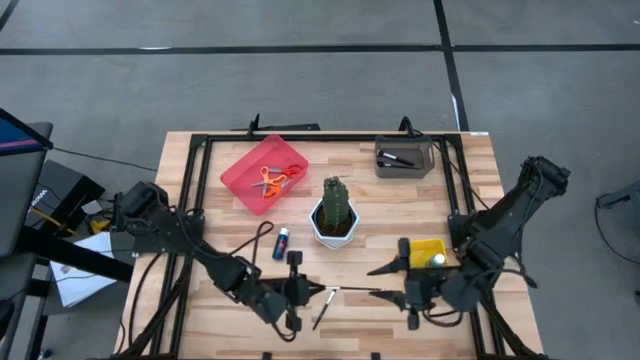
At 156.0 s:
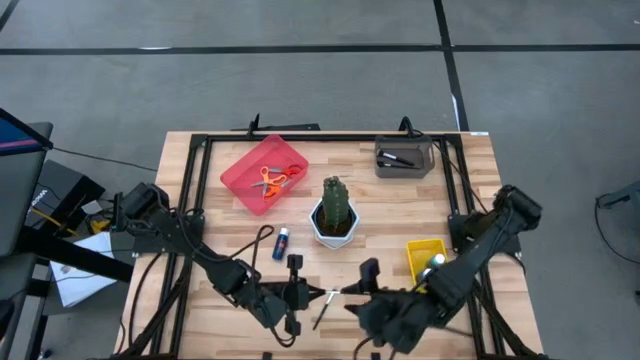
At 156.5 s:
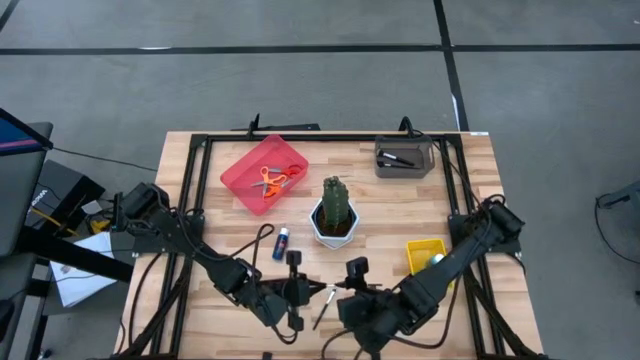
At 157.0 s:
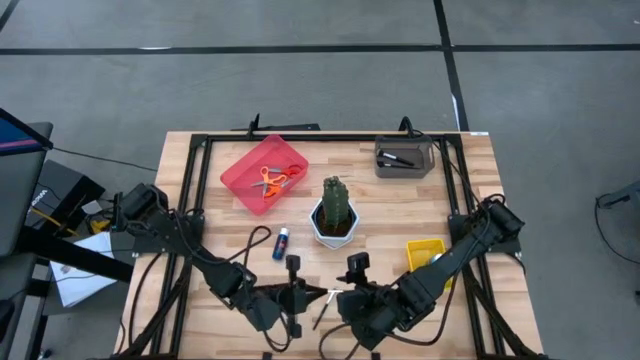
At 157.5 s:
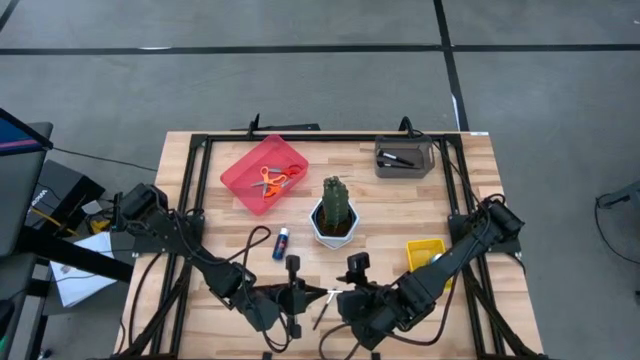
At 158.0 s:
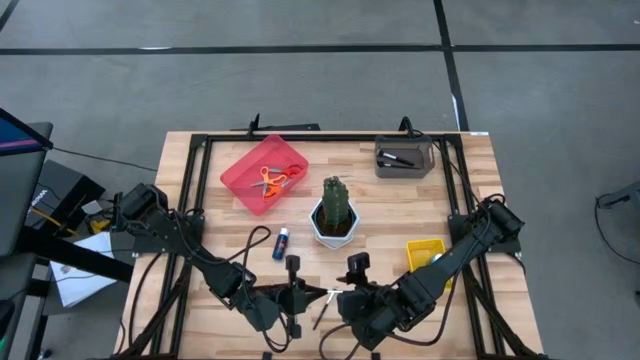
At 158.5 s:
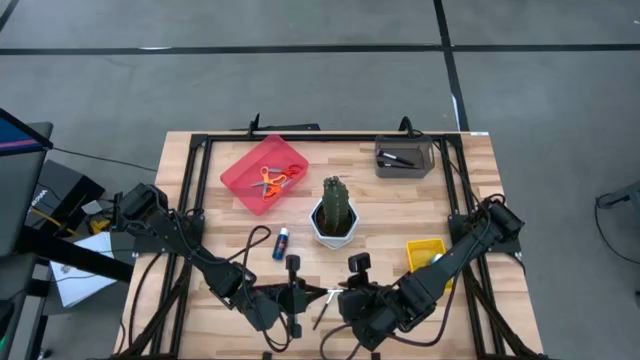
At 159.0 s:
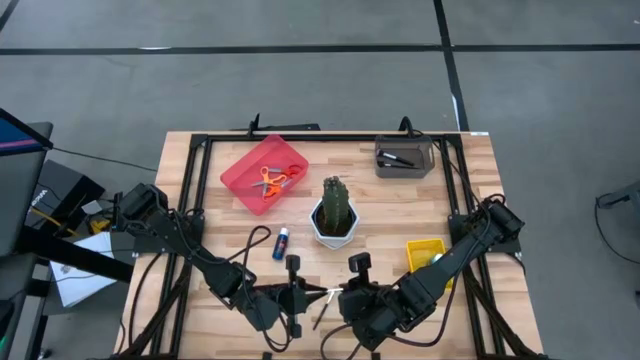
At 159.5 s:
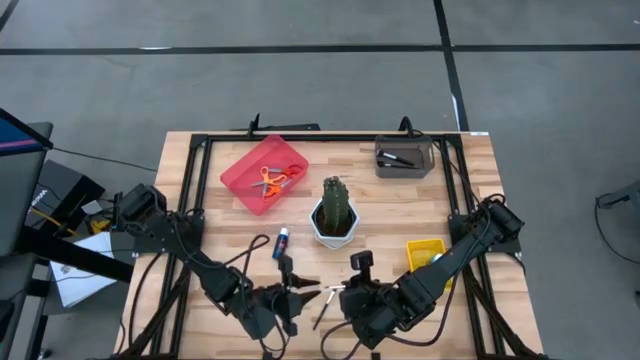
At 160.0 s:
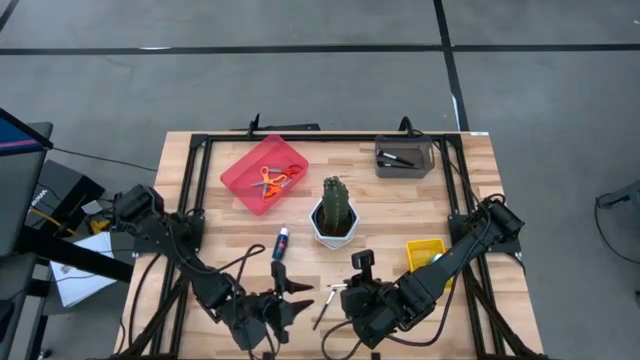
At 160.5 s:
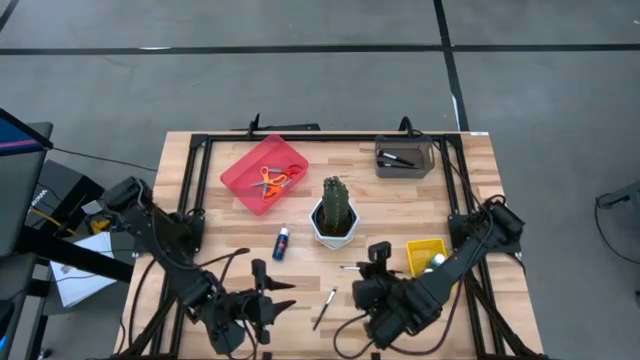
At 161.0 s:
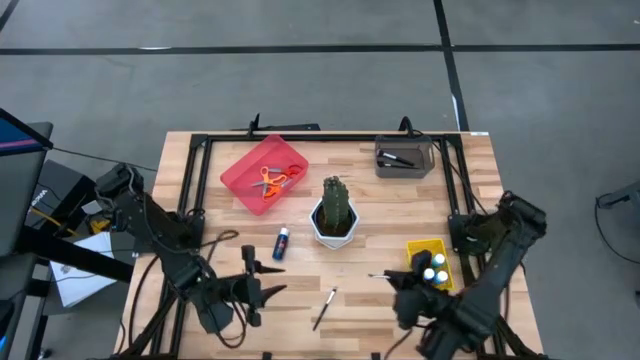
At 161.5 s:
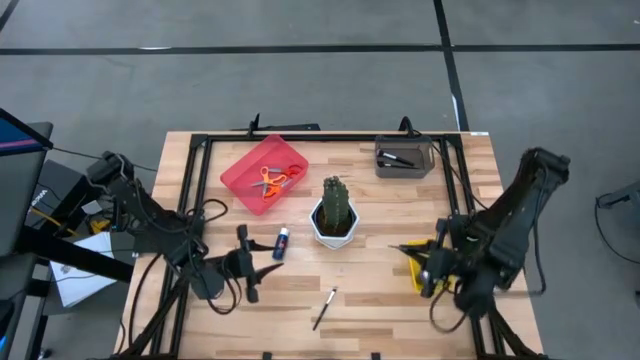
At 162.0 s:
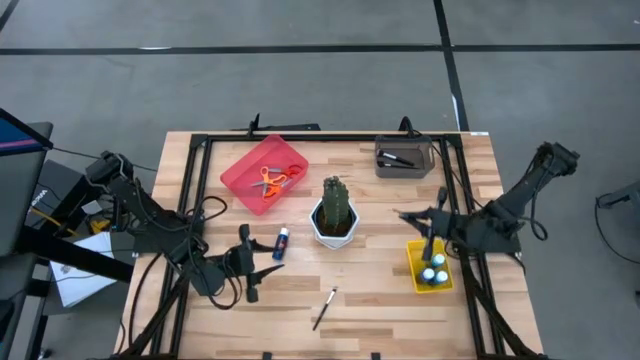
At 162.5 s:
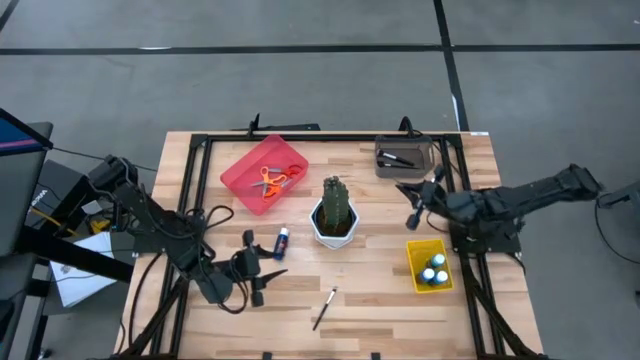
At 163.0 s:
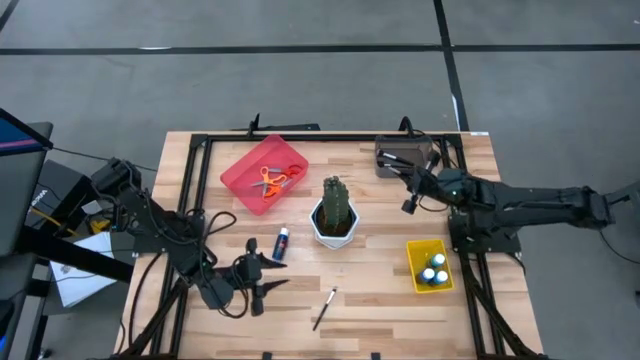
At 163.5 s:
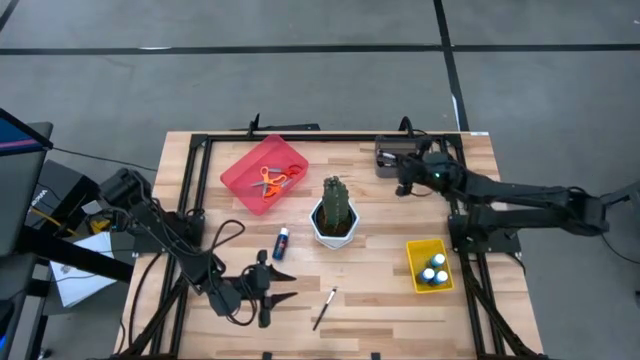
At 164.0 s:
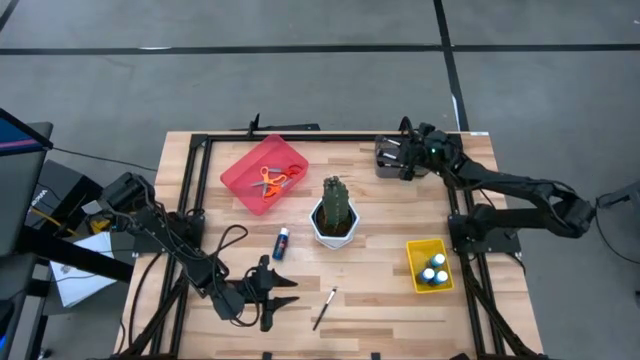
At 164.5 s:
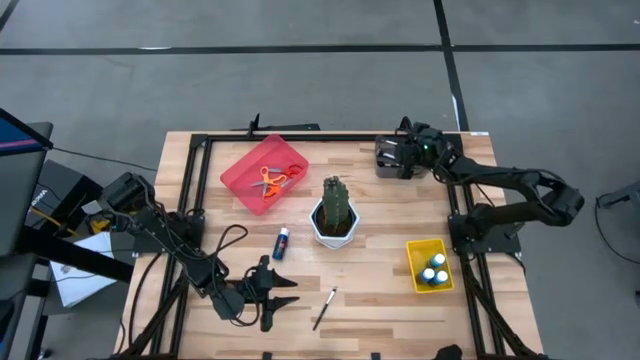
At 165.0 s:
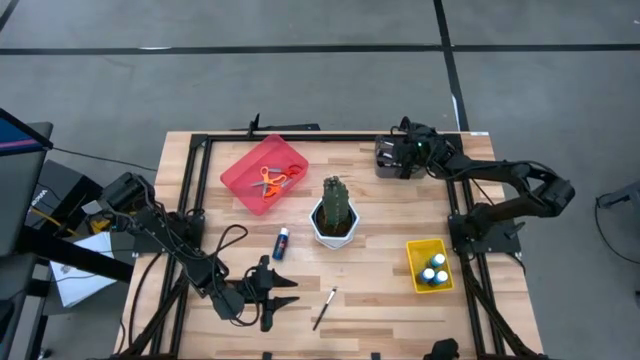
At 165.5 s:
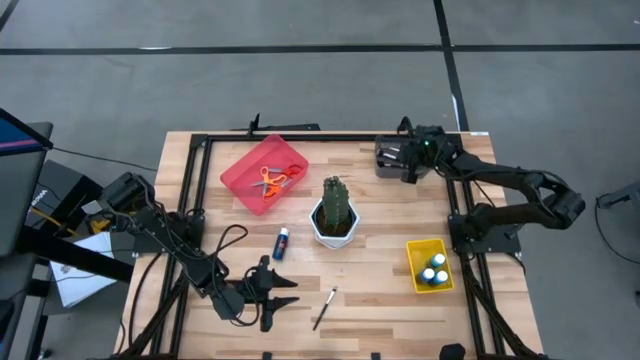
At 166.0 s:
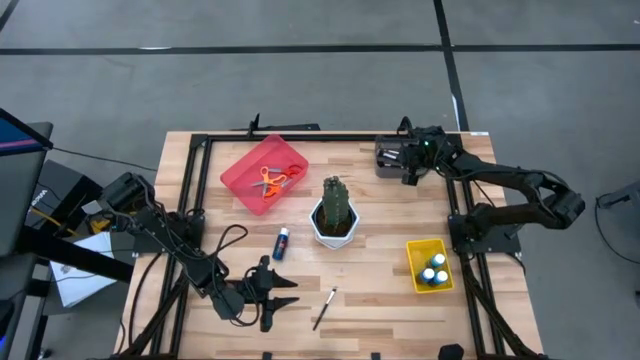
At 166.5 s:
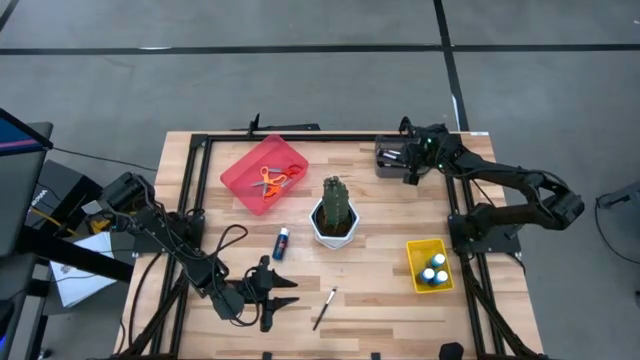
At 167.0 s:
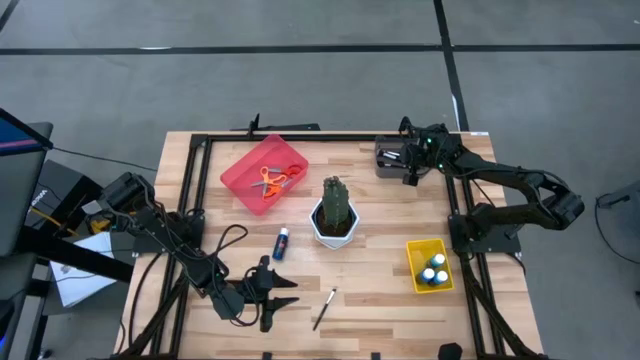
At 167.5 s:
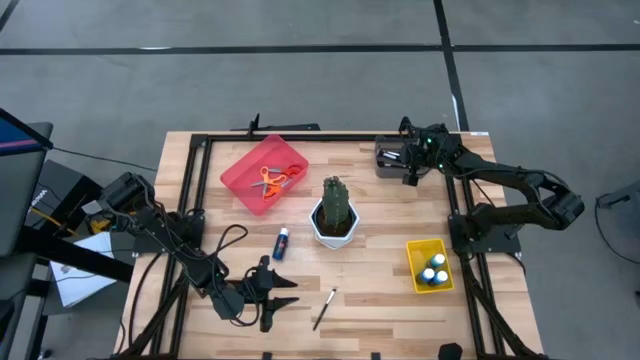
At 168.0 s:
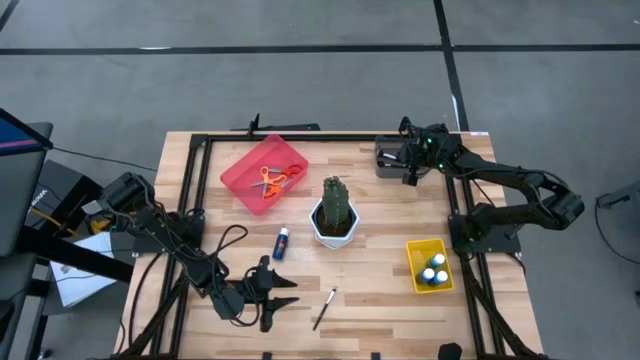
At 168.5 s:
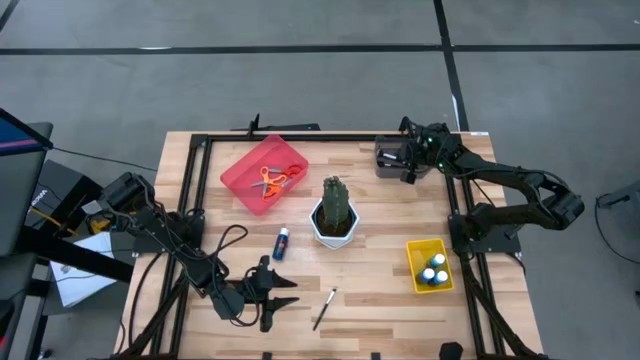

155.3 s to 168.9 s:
Task: Pick & Place Paint Supplies
Put the top foundation brush into the black bin

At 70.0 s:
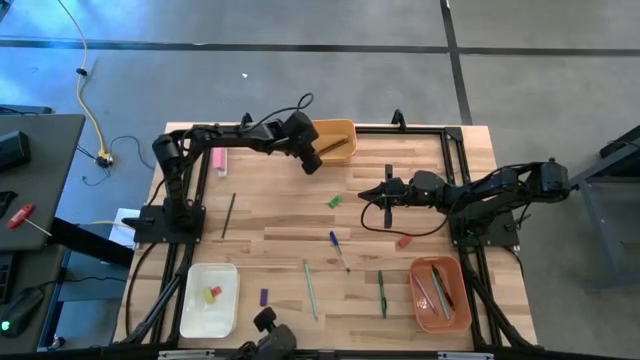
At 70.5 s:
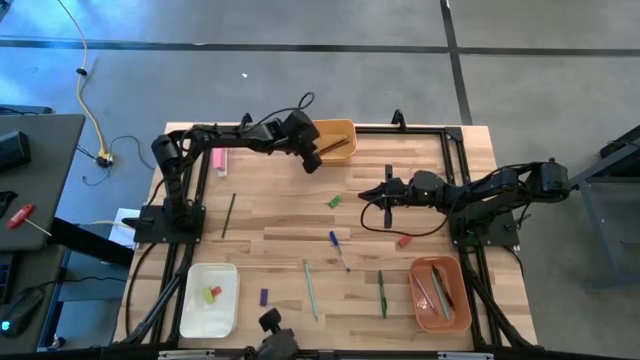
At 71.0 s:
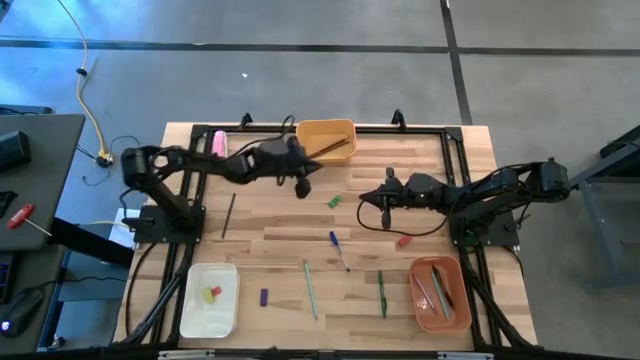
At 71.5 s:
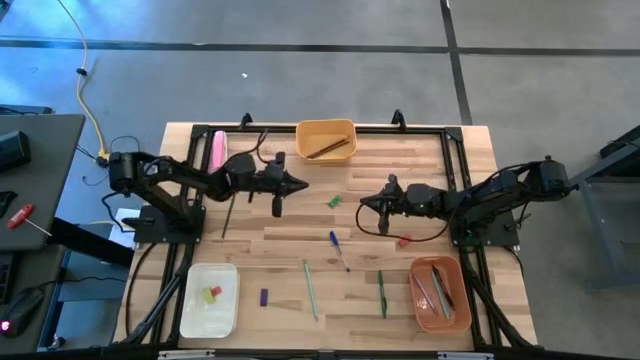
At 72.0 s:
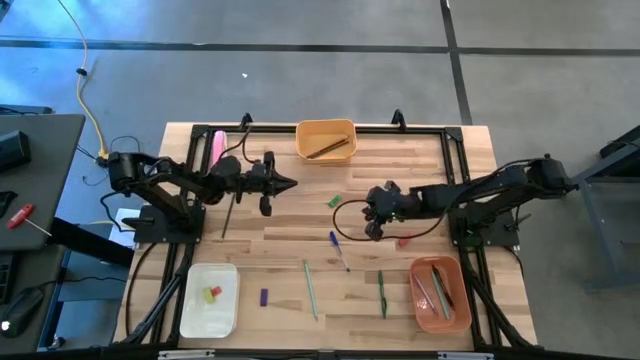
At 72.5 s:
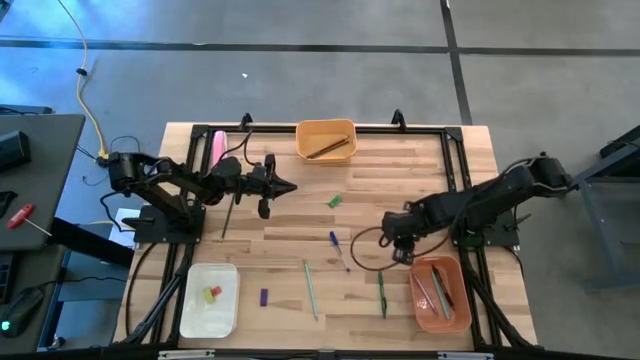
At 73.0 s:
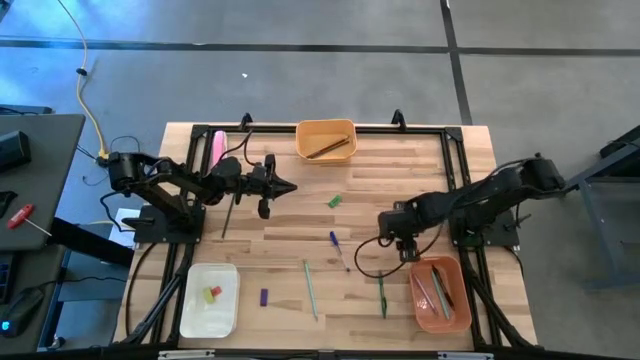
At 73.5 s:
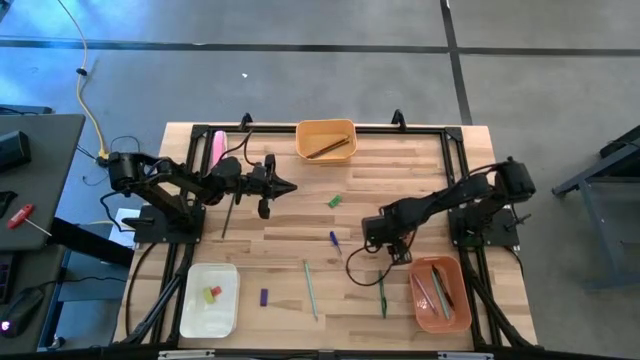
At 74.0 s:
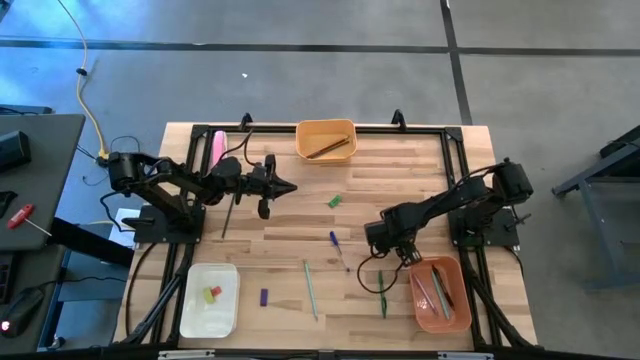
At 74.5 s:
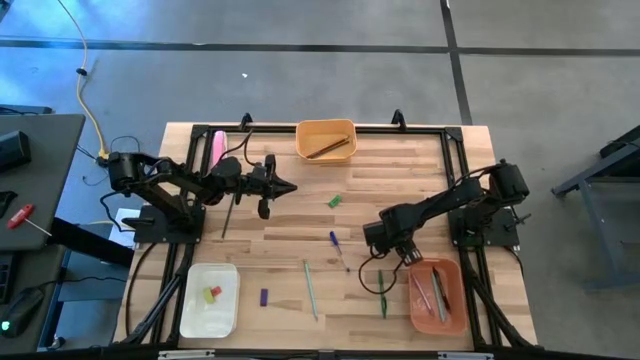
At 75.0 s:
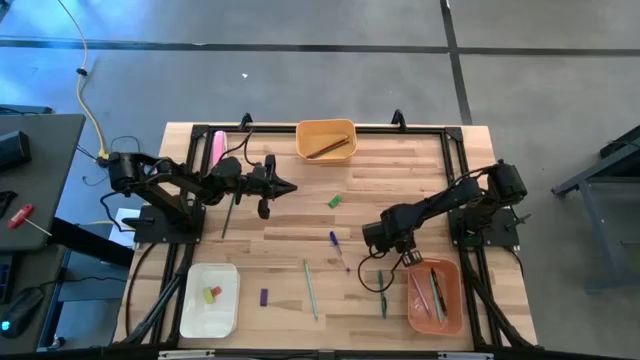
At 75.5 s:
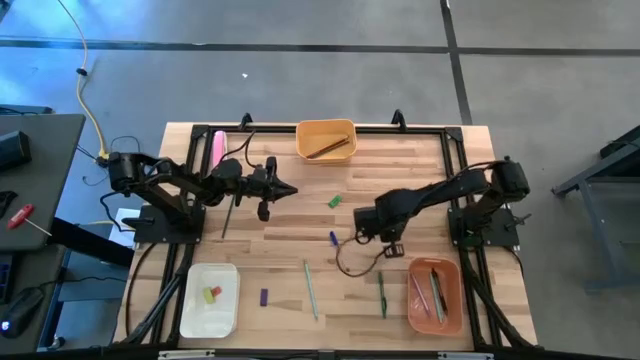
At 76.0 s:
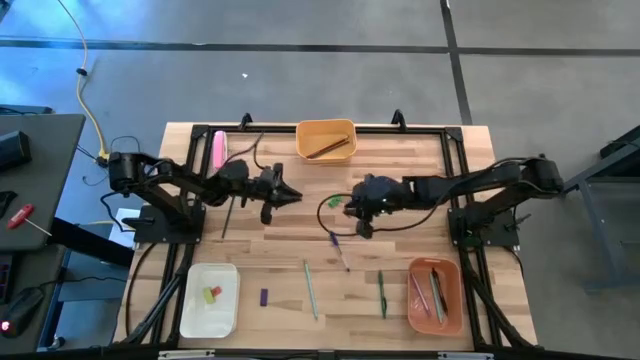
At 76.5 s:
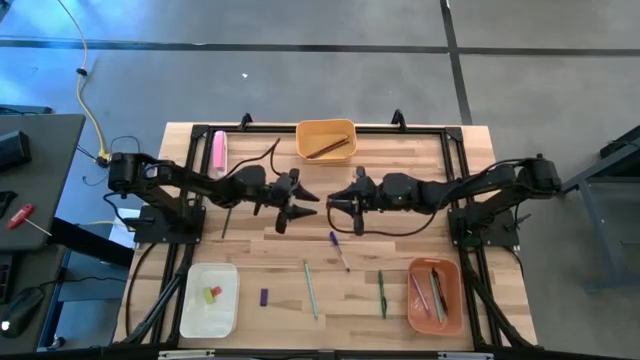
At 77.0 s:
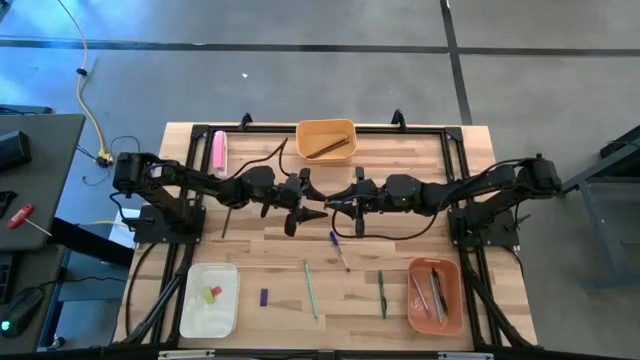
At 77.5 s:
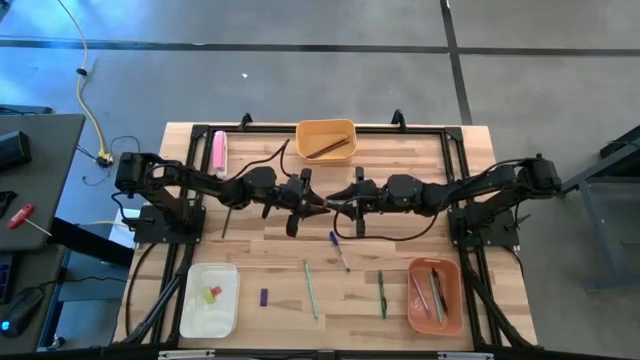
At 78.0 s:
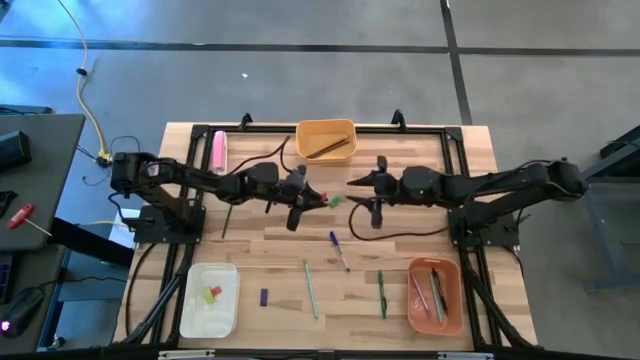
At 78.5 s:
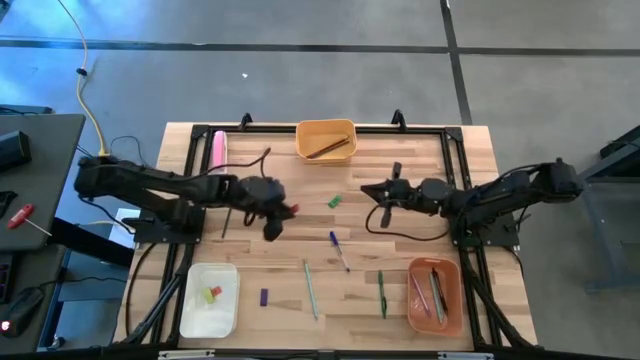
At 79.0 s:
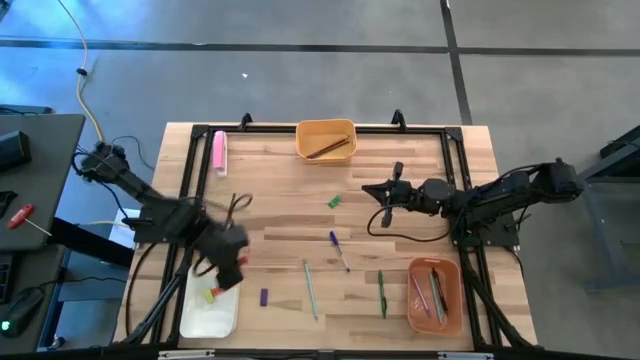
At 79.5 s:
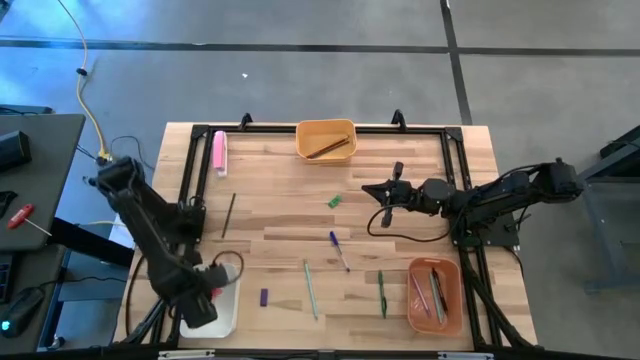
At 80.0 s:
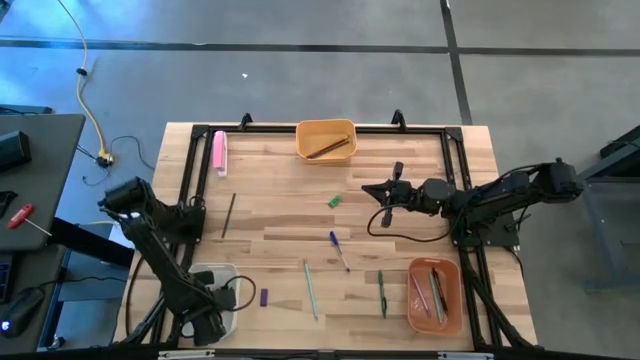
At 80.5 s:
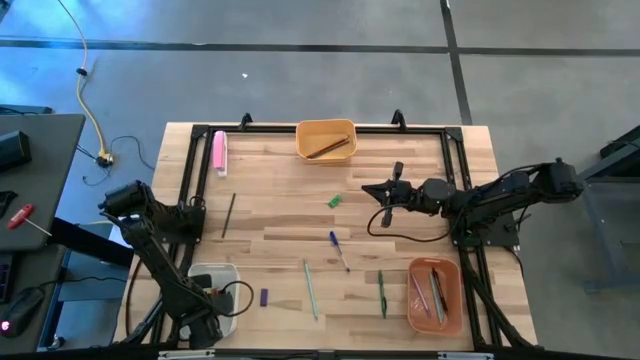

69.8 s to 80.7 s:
Task: Sort crayons/erasers/pens/pencils in bins
Put the dark orange eraser into the white bin
